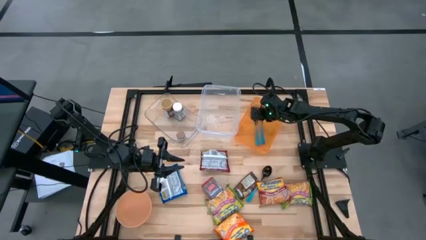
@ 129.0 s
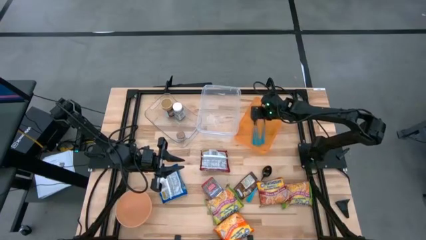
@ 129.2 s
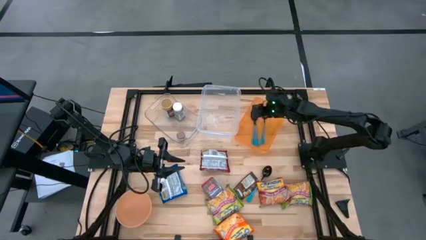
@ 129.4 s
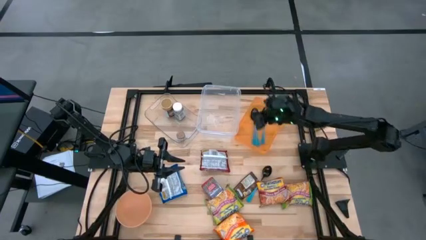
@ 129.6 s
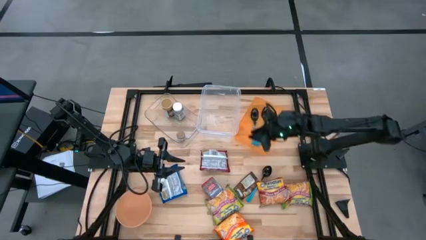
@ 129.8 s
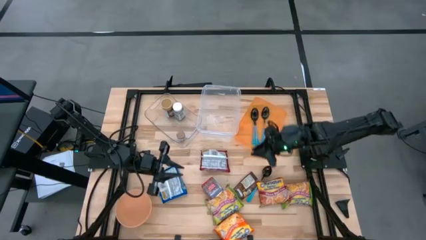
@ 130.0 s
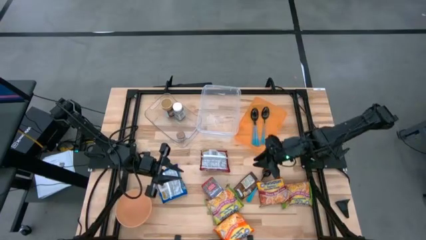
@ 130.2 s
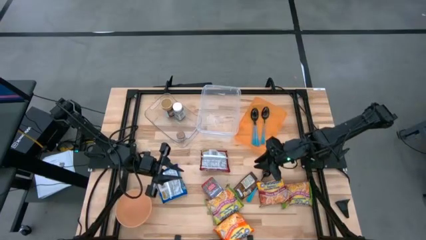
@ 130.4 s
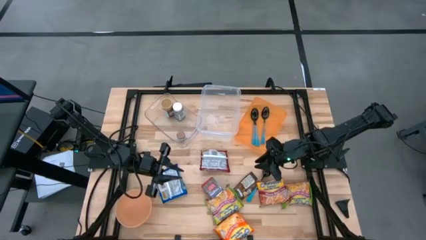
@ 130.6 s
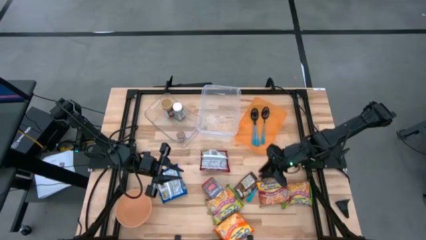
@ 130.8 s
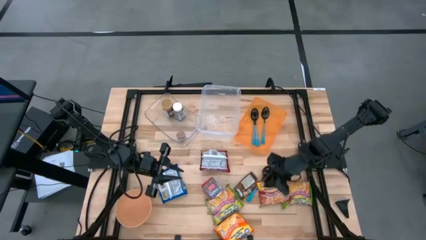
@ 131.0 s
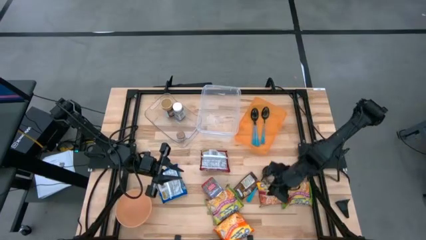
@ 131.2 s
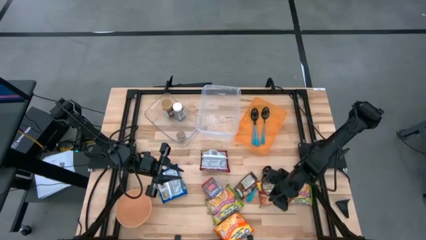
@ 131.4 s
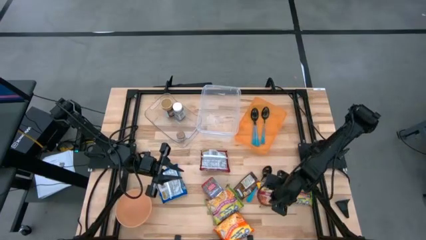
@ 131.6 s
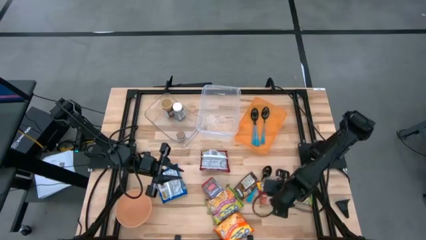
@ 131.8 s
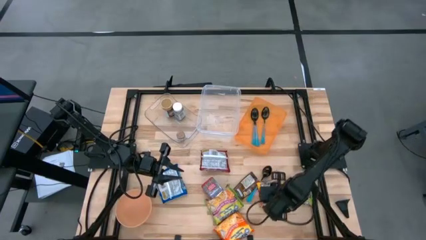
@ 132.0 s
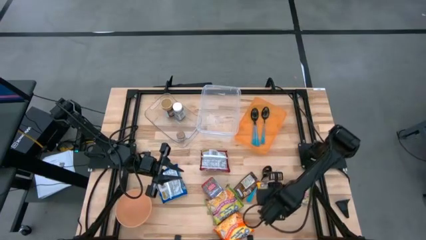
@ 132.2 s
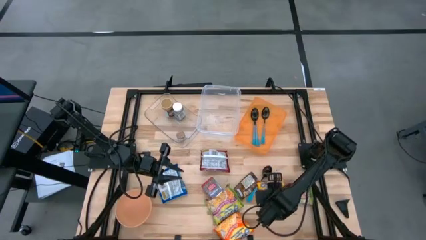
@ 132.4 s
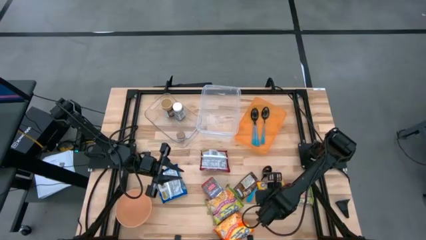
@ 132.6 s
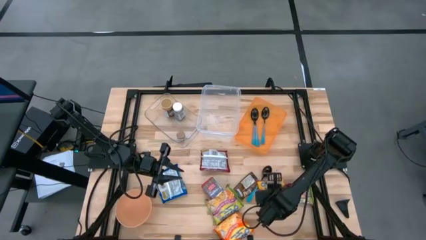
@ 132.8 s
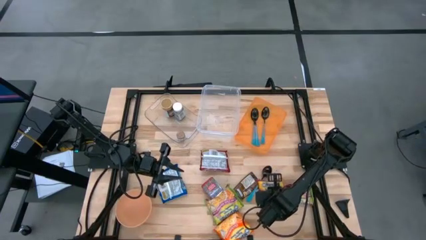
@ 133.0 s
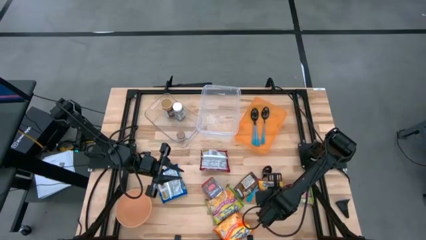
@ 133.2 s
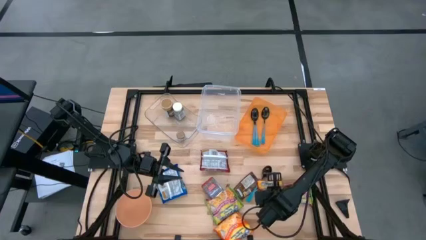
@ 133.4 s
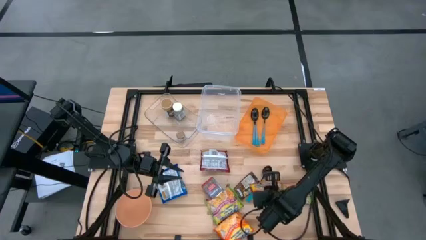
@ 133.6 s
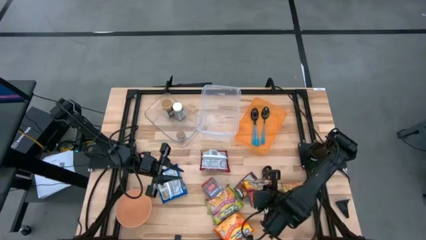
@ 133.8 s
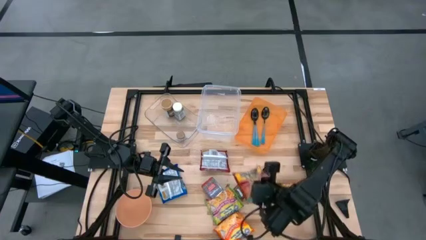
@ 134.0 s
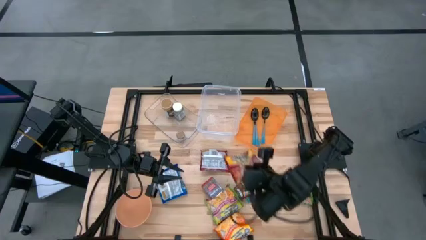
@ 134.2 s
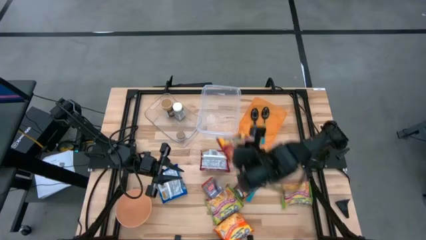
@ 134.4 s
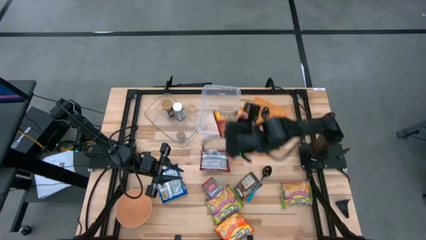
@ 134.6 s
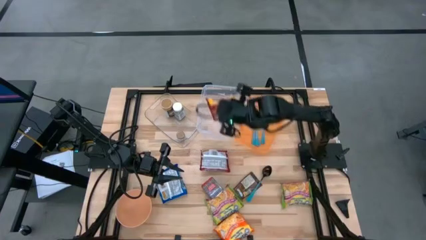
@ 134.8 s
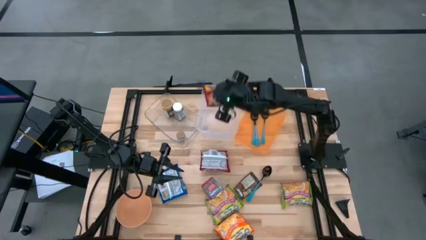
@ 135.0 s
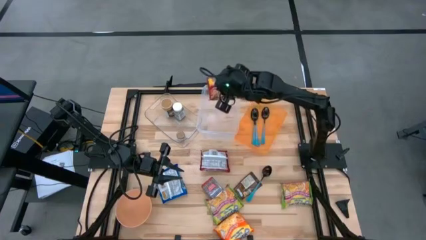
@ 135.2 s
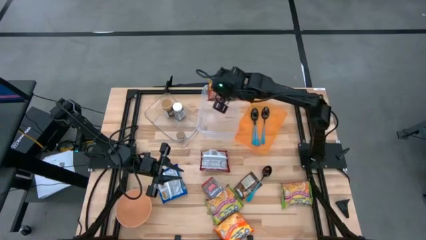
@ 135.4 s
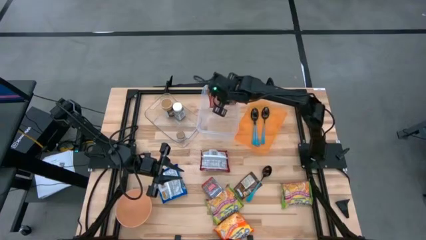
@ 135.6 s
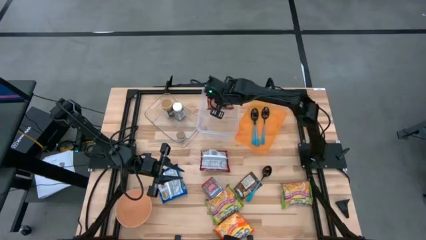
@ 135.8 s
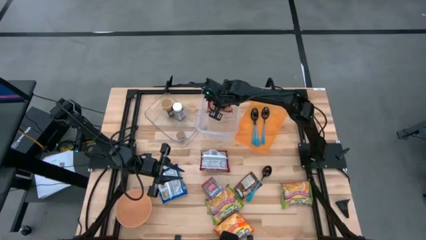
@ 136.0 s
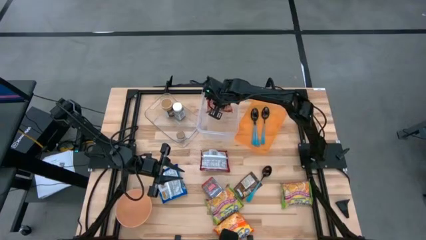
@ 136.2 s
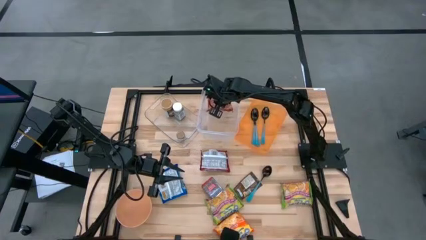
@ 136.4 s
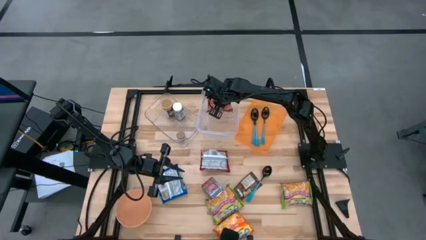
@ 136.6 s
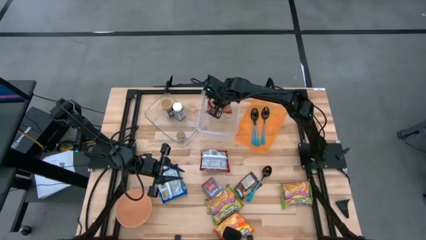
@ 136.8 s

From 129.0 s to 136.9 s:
Task: Pick & Place Food Item
Put the red noodle pack into the white bin

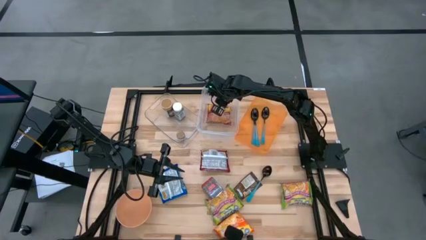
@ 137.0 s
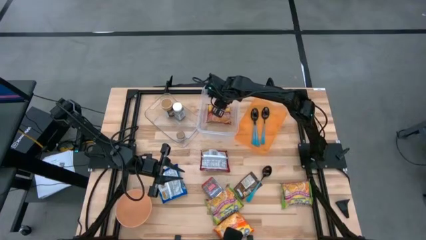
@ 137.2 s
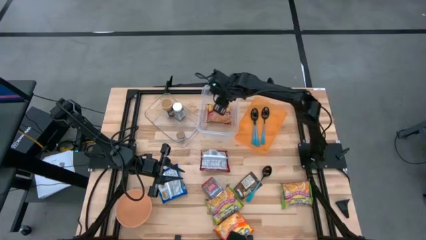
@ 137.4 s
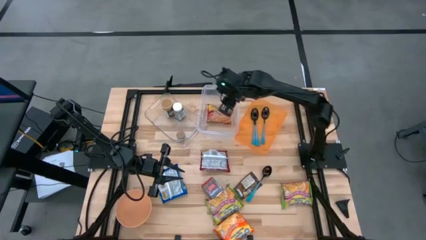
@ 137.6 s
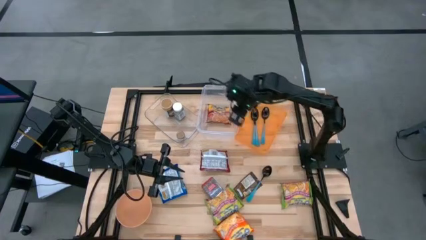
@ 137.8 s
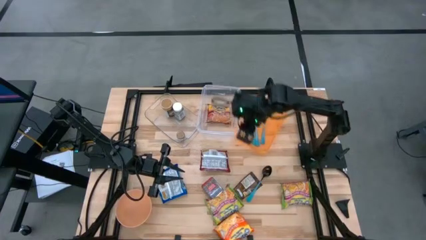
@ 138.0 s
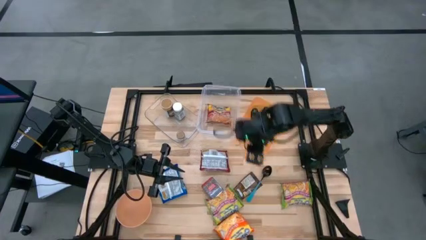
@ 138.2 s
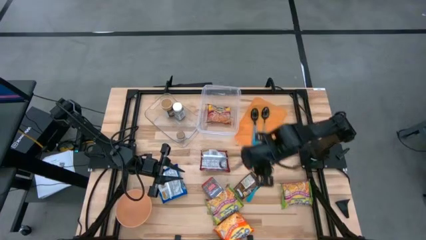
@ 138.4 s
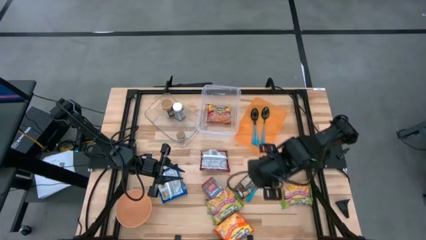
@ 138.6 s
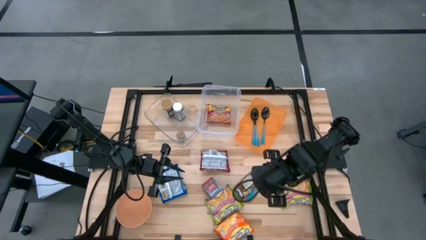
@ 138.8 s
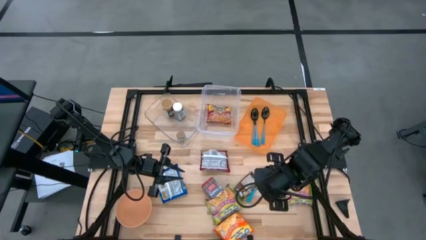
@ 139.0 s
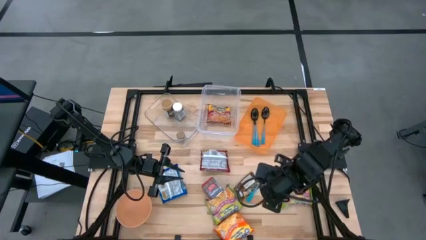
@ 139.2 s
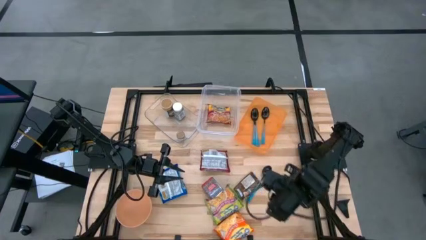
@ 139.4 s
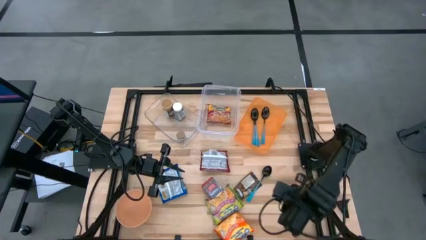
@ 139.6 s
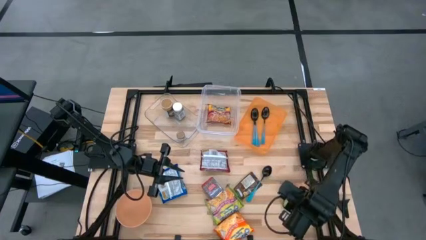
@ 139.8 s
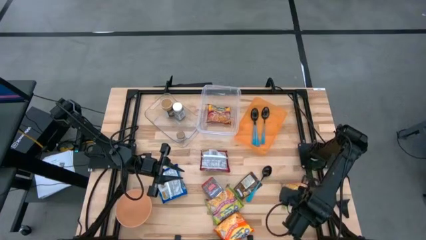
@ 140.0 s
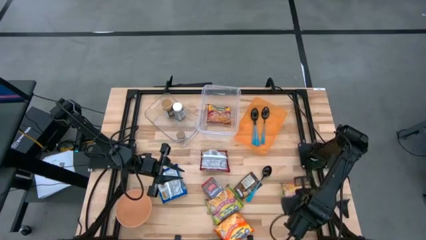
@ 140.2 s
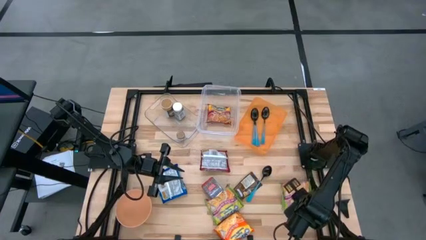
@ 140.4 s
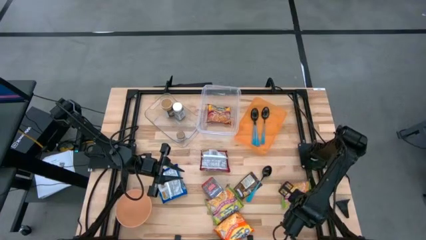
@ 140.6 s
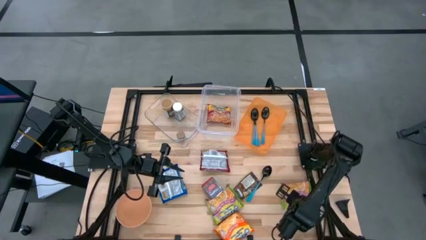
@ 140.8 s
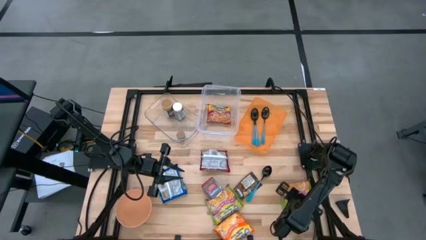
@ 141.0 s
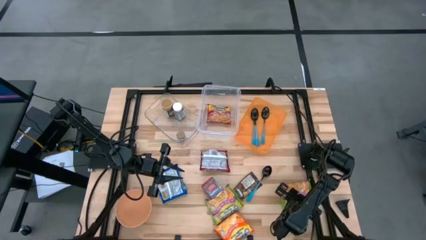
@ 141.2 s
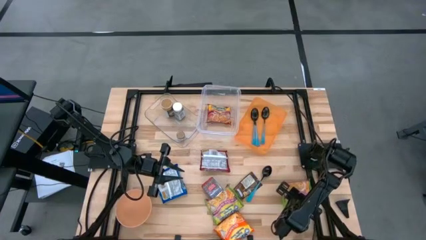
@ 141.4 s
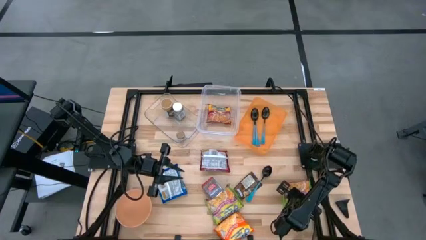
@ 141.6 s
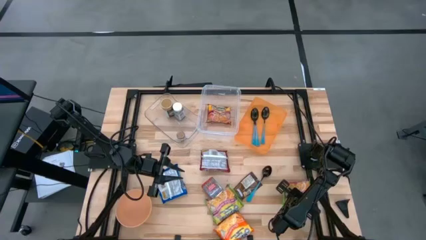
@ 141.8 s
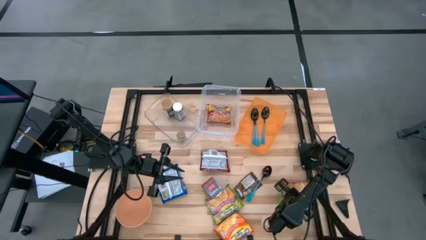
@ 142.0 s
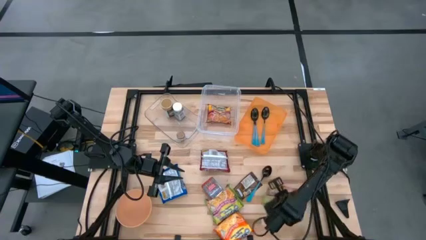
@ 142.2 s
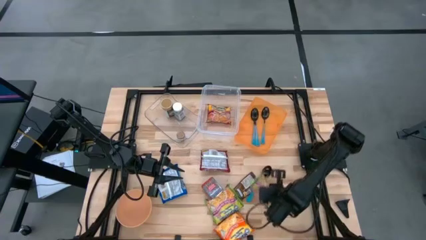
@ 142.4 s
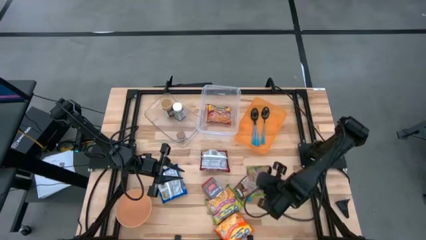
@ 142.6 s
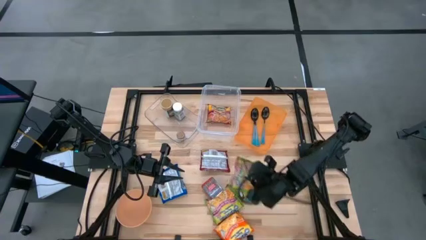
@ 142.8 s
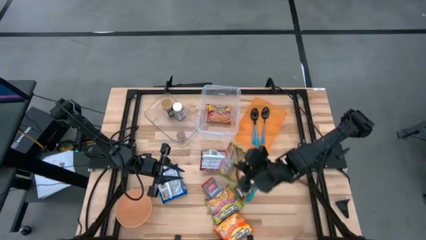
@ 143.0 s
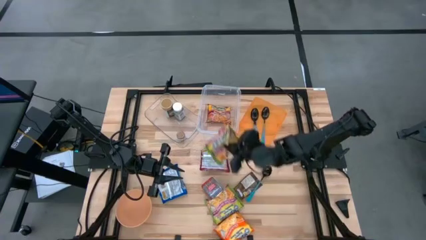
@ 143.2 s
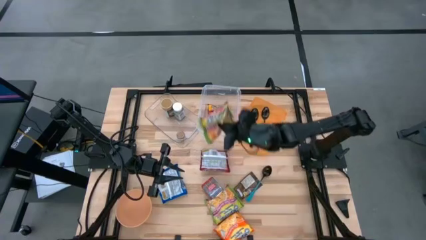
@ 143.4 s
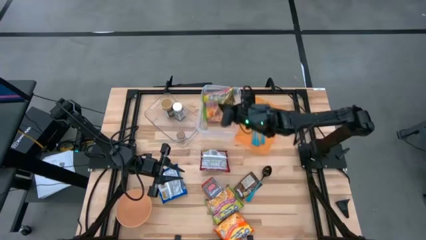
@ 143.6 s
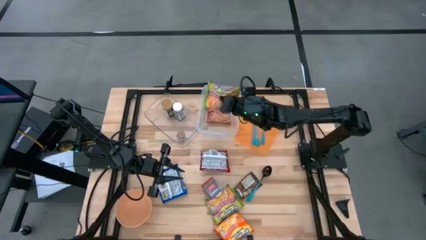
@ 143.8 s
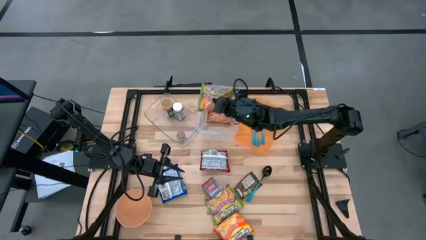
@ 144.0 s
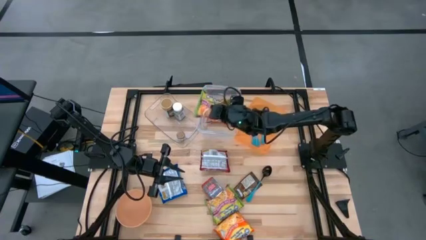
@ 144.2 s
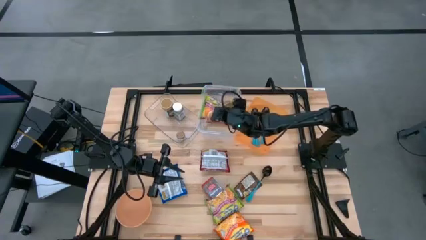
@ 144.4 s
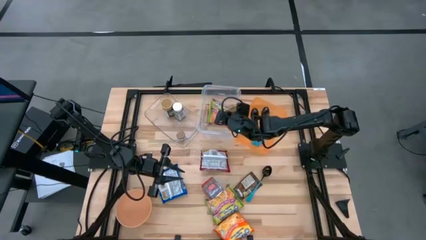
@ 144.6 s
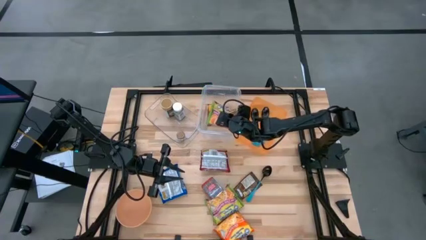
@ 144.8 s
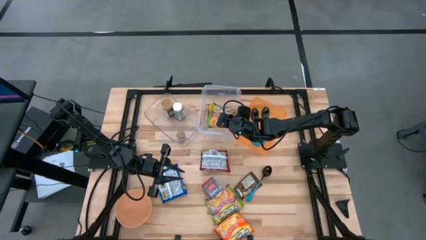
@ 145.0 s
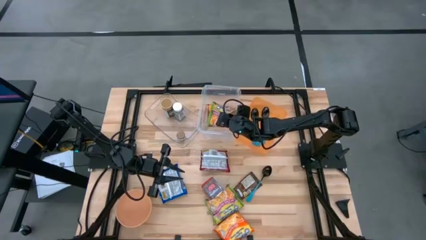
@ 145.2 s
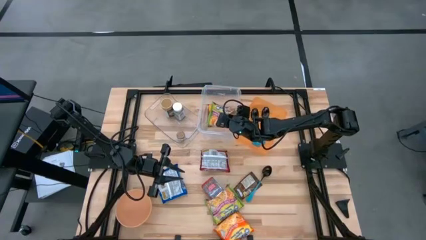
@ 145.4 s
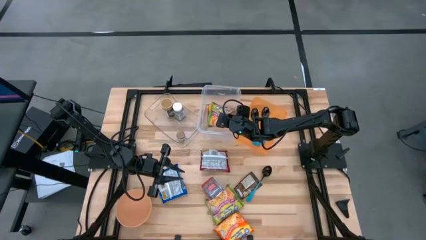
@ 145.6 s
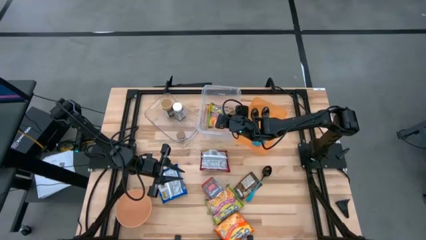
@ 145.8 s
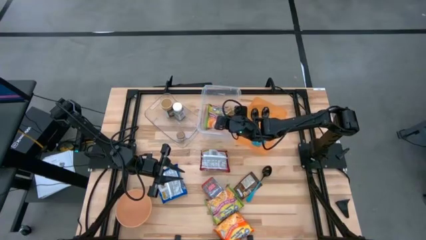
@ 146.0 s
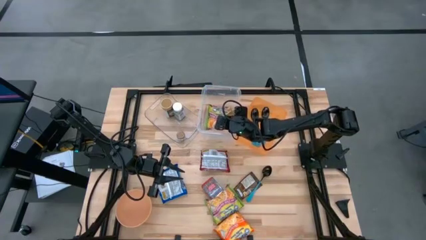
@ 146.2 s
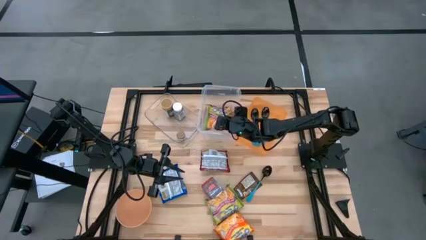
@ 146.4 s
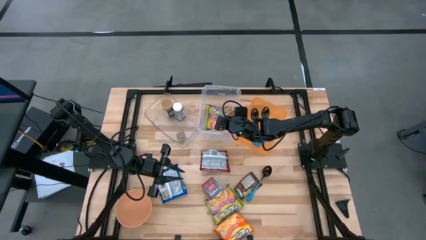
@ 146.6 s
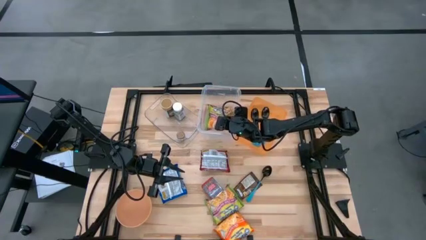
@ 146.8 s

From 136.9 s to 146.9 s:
Put the green noodle pack into the white bin
